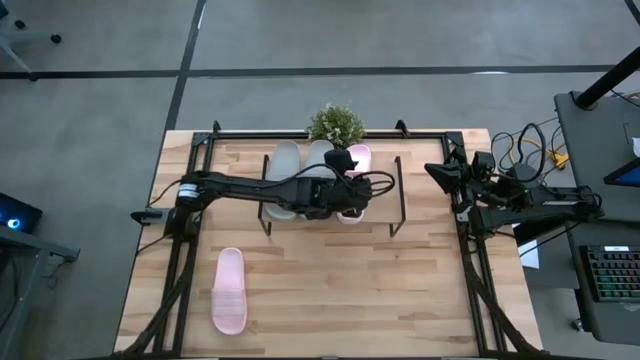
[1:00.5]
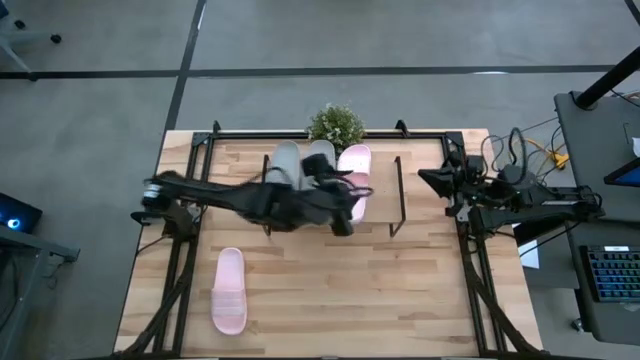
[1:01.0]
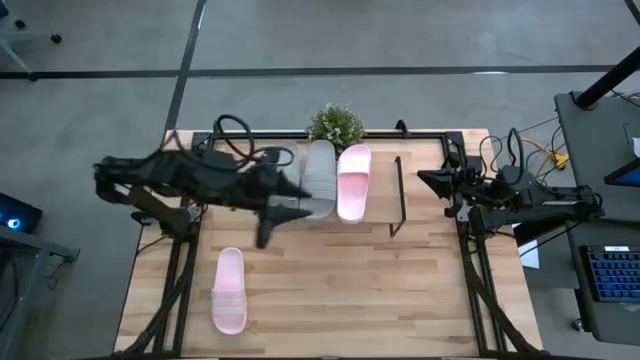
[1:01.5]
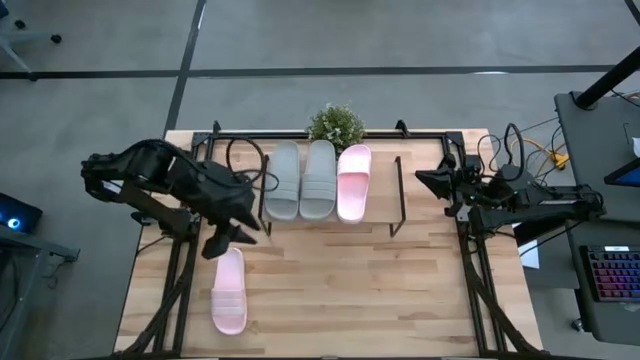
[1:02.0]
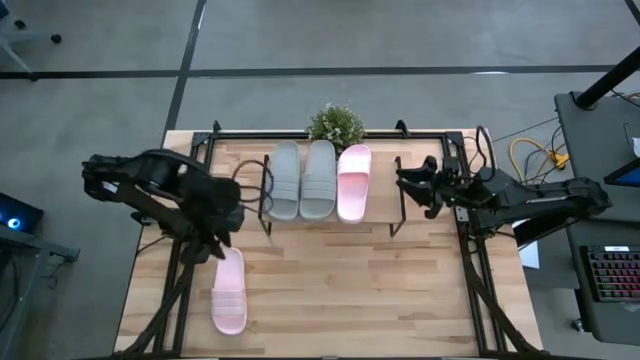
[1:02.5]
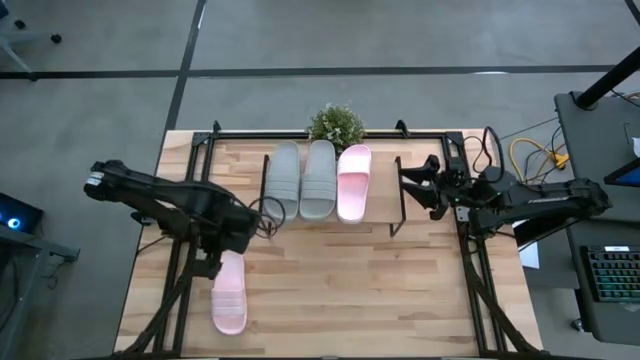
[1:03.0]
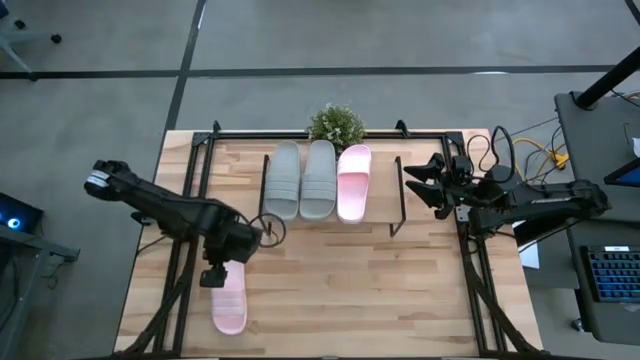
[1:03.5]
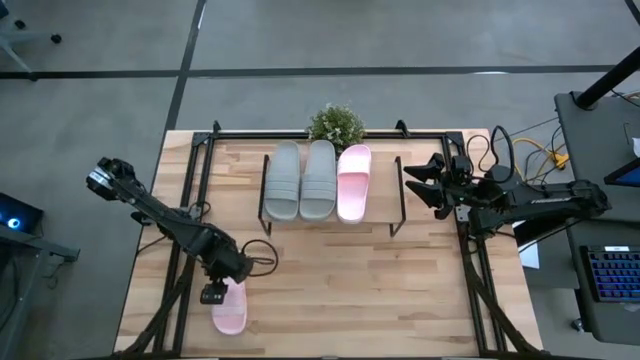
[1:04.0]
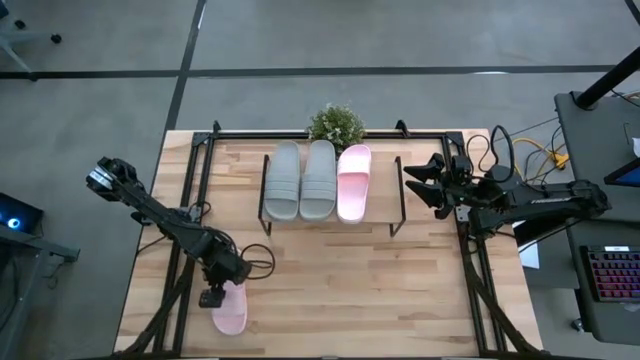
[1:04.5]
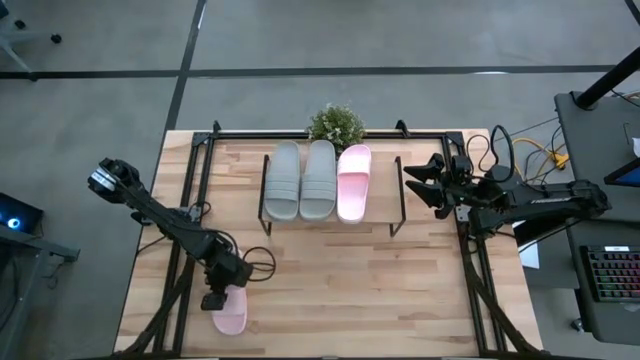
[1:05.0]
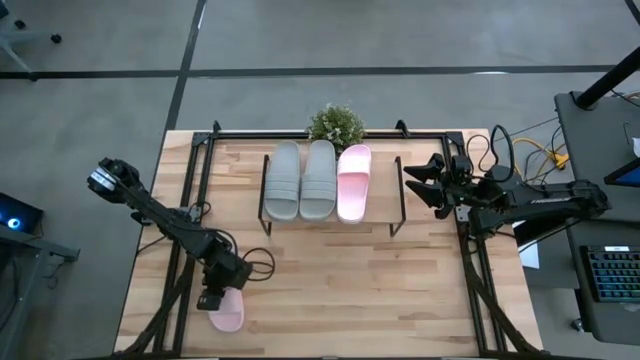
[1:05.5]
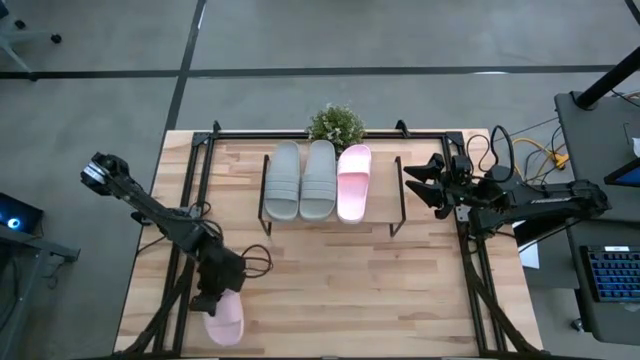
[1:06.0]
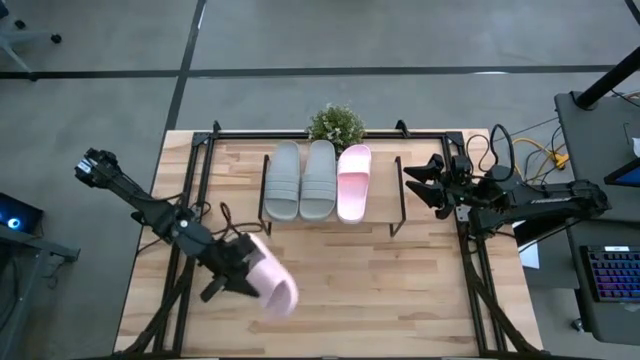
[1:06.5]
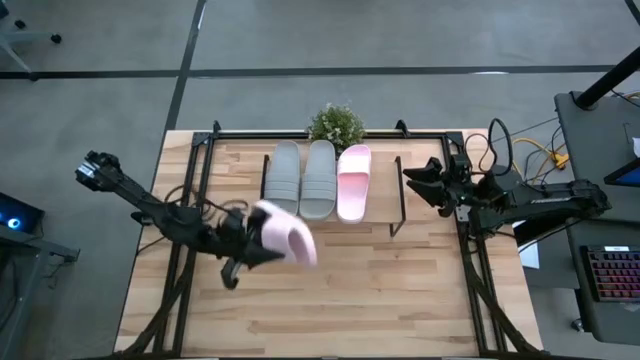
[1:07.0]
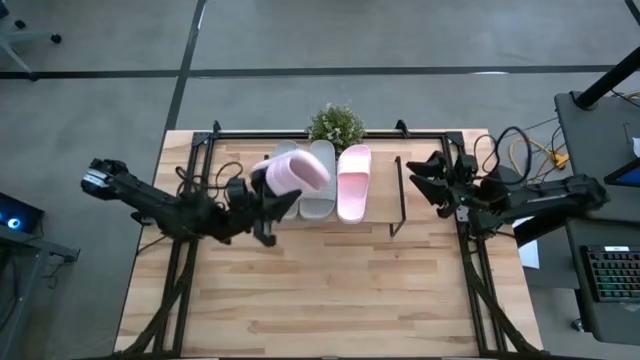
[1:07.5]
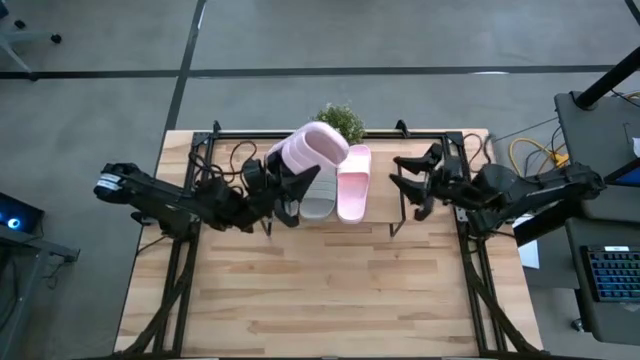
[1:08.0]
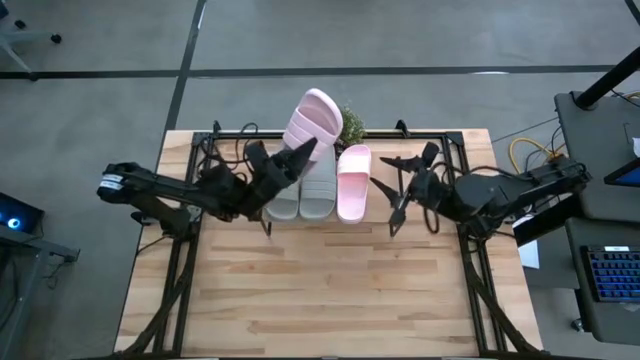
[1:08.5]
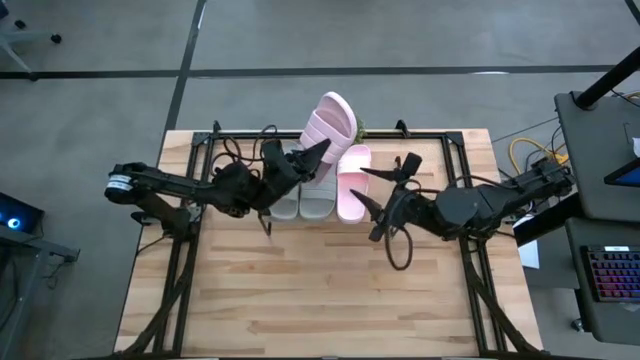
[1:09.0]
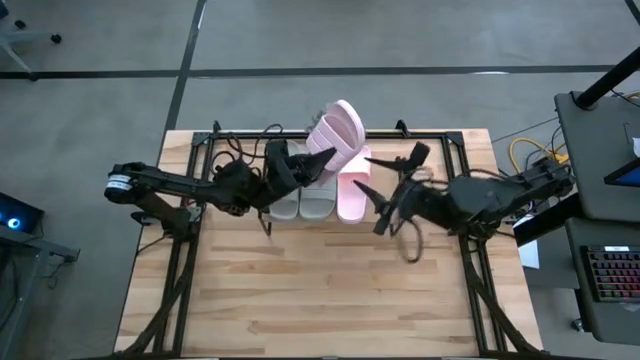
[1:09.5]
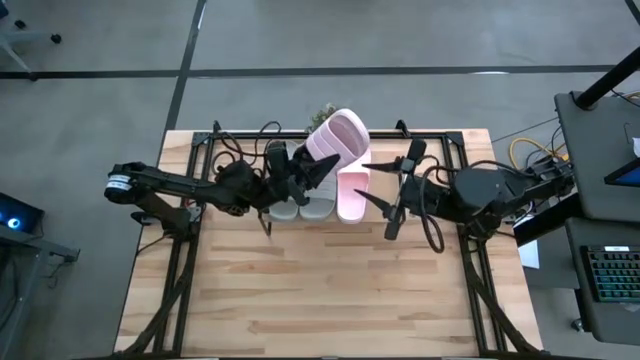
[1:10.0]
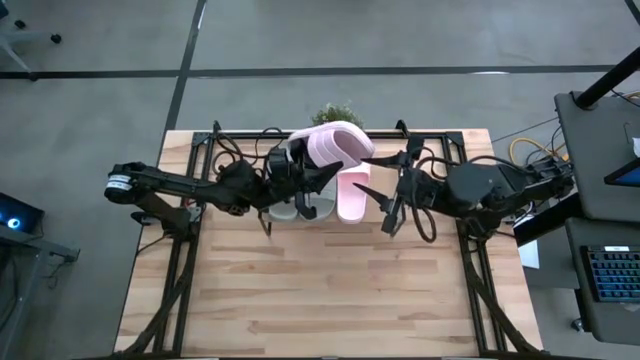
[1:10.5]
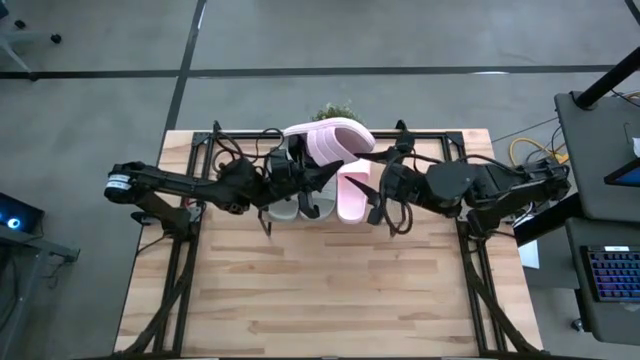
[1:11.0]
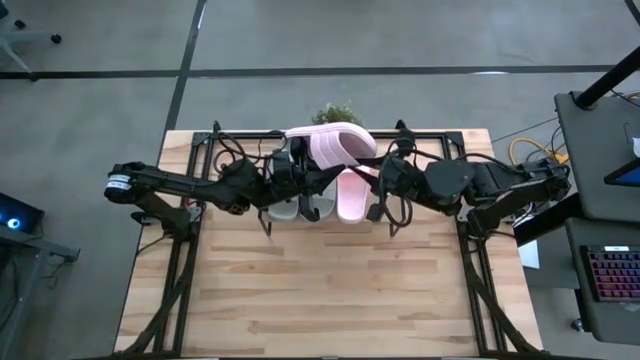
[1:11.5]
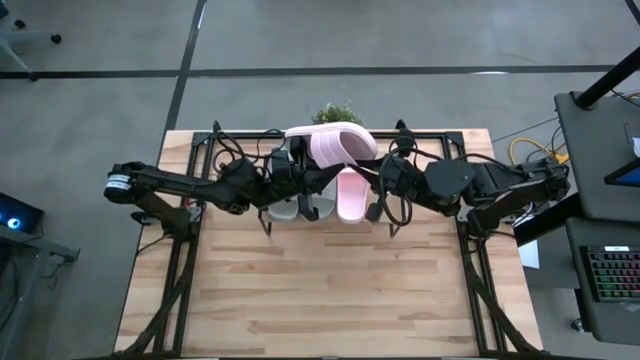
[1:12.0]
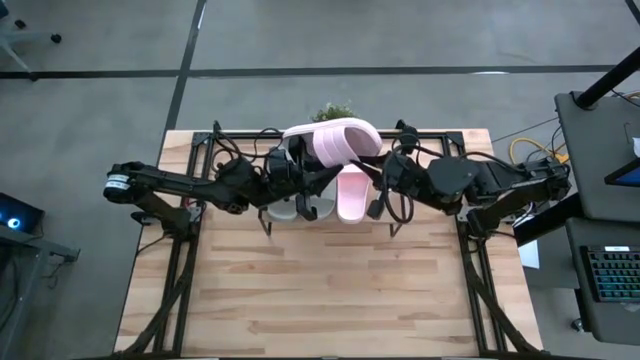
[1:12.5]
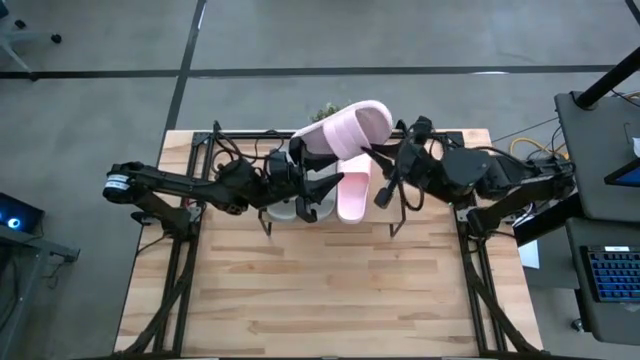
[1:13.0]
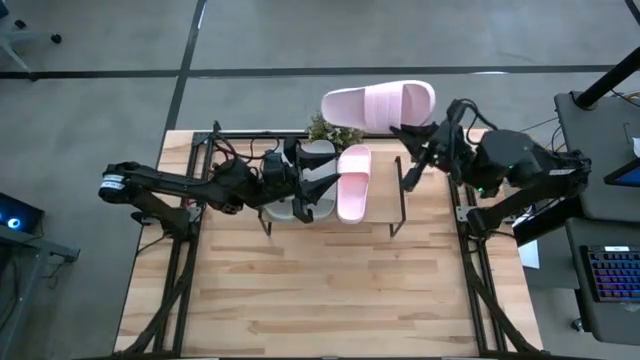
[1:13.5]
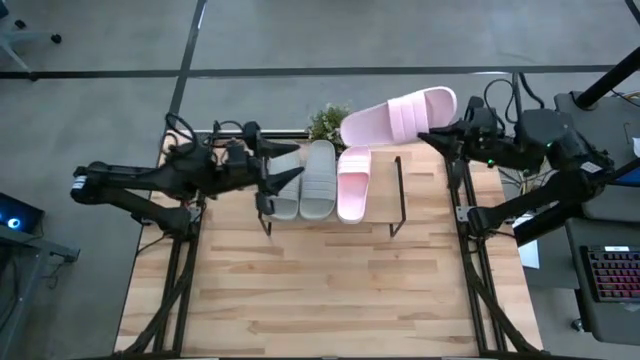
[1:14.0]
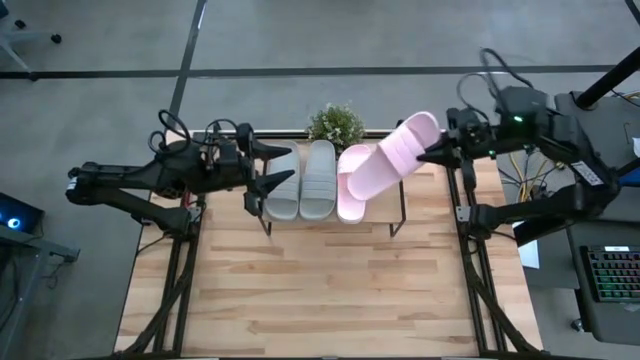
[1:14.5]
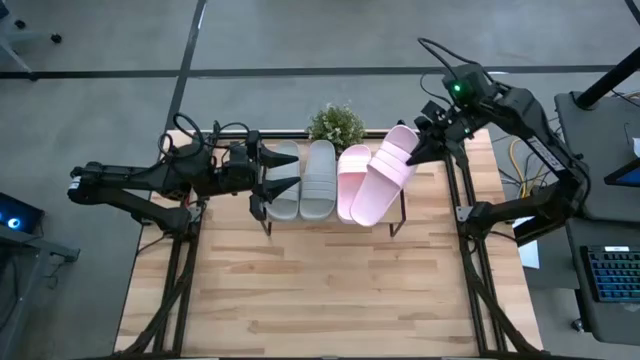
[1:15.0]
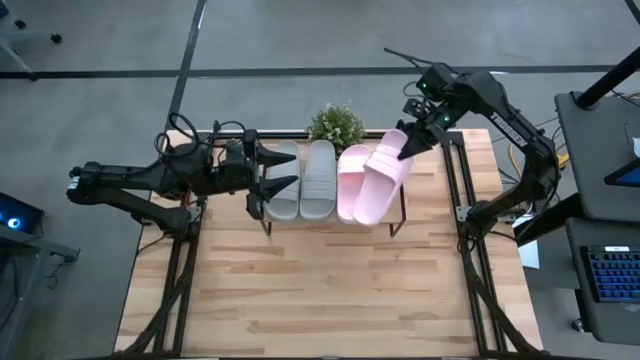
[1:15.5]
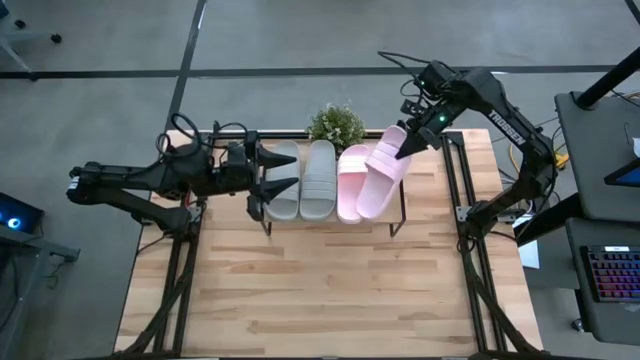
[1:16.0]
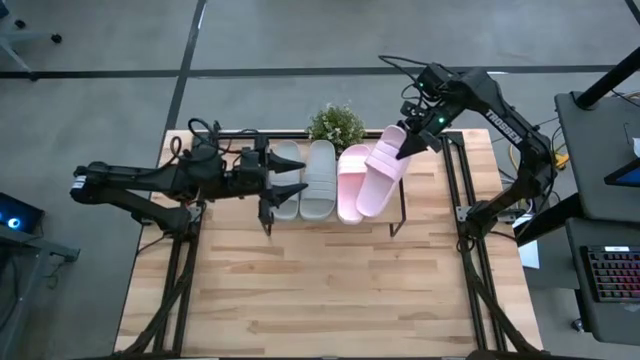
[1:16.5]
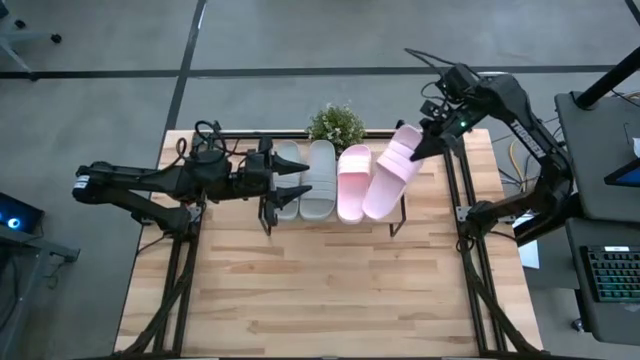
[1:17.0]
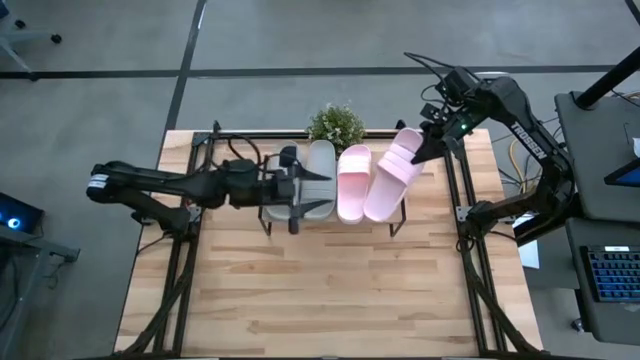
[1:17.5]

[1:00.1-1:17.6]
Task: Pick and place slides into the shelf
Put the right pink slipper on the shelf

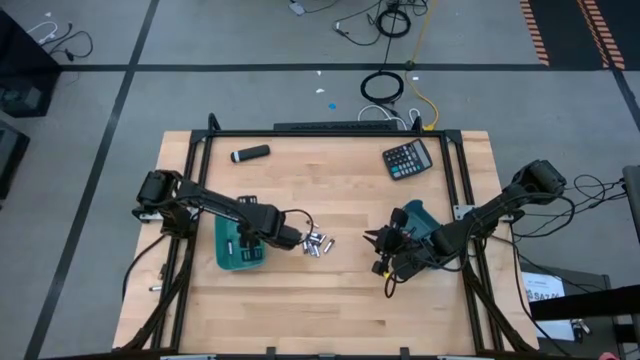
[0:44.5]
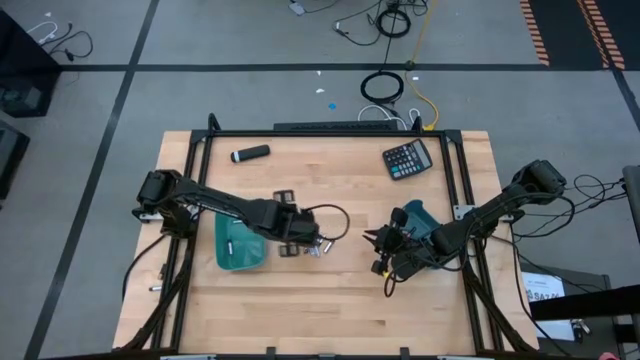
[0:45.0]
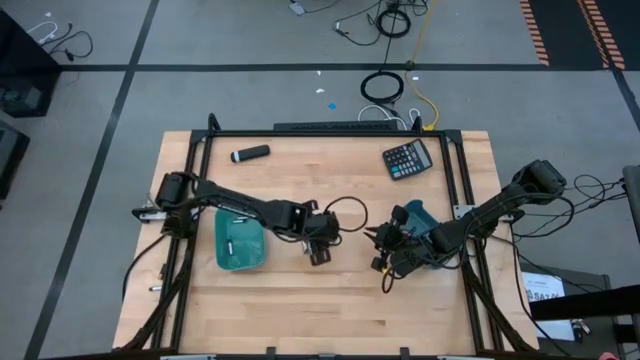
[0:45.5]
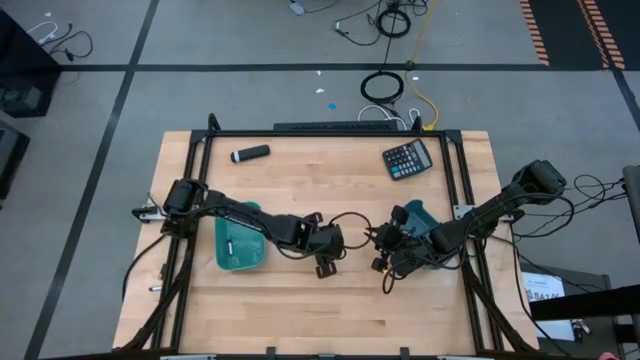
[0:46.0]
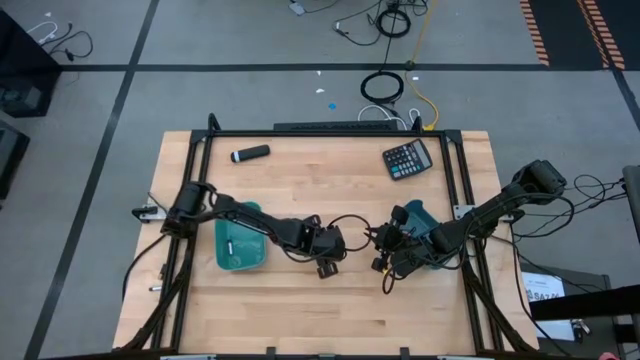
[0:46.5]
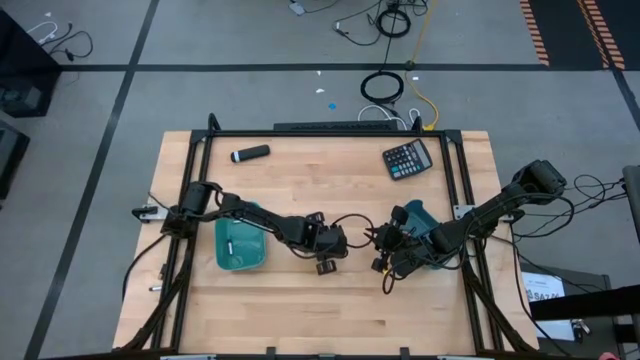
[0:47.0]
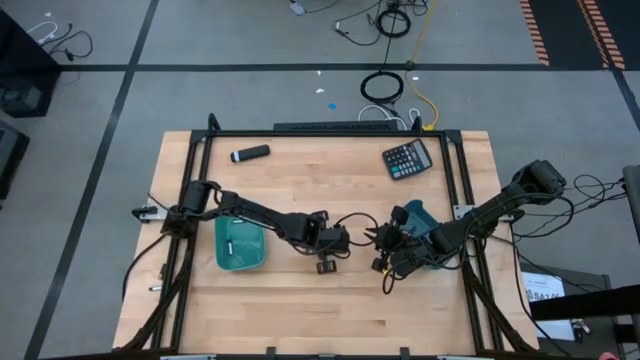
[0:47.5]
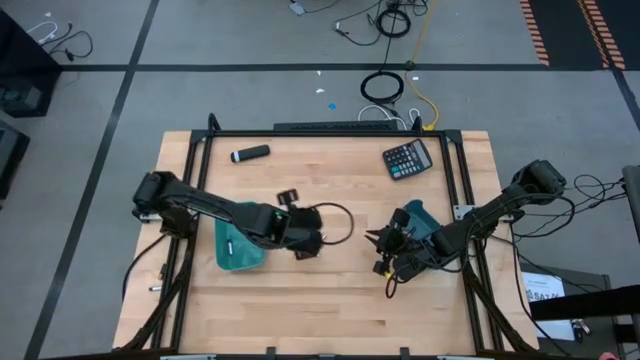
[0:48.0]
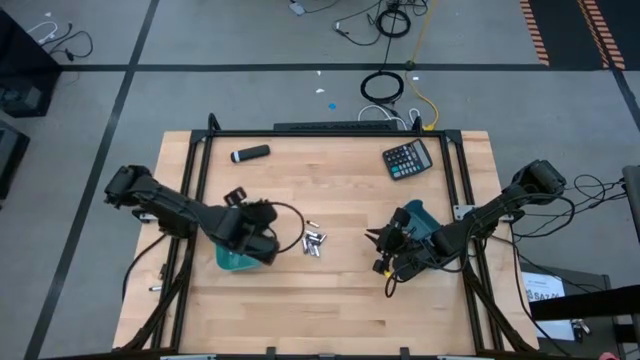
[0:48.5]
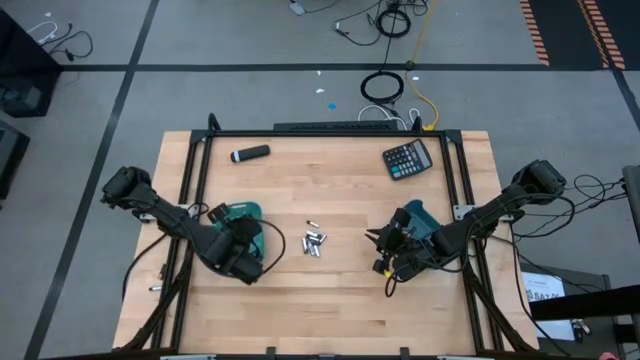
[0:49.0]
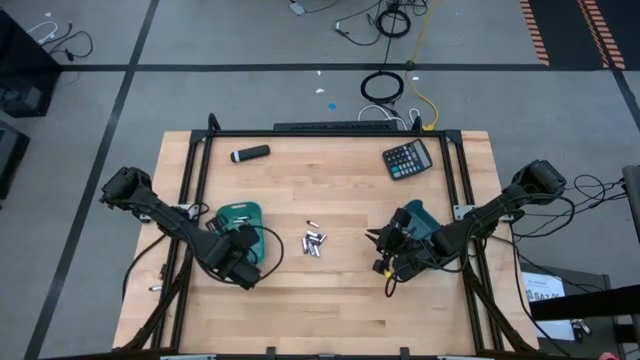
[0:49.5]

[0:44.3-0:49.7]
Task: Sort batteries
Put the silver battery into the light blue bin
